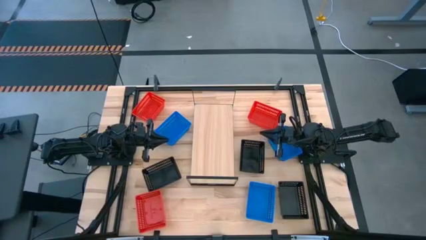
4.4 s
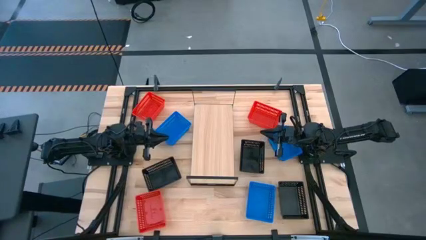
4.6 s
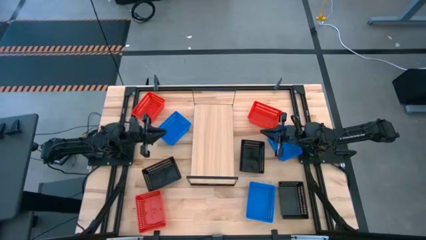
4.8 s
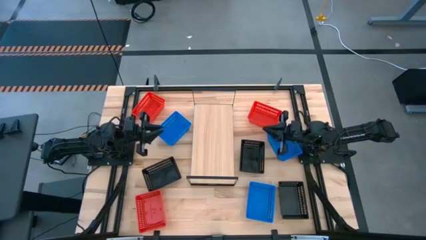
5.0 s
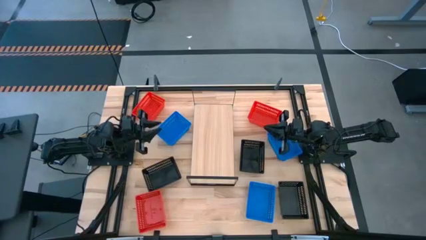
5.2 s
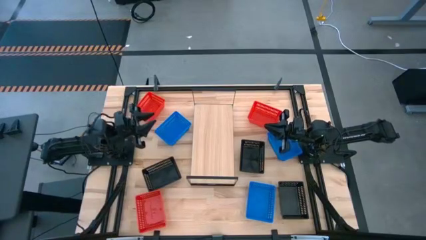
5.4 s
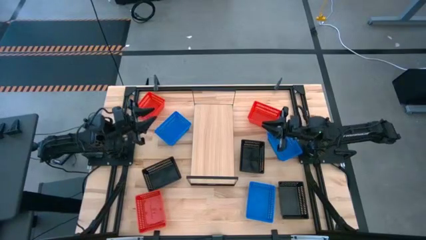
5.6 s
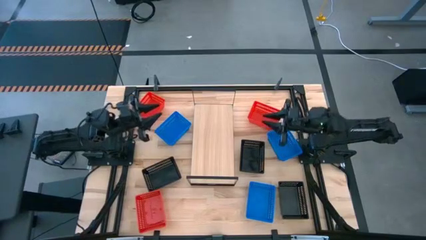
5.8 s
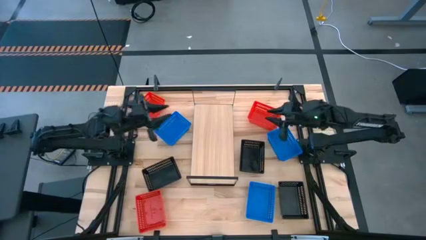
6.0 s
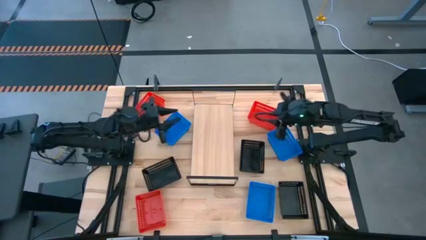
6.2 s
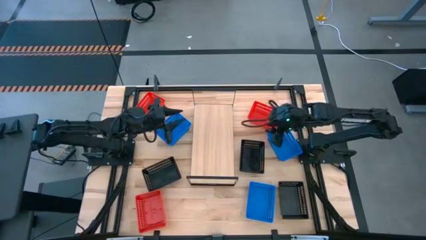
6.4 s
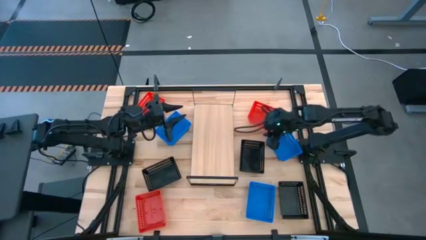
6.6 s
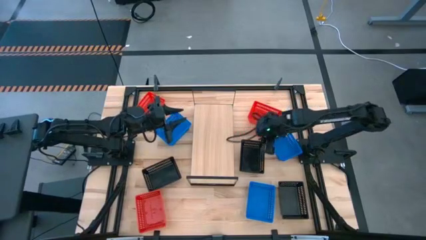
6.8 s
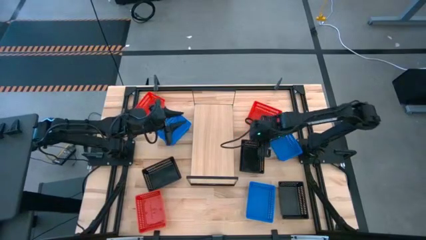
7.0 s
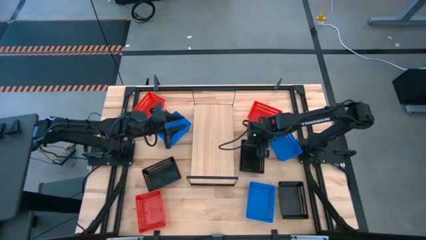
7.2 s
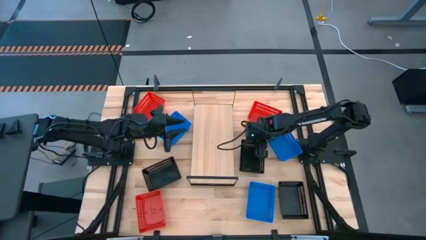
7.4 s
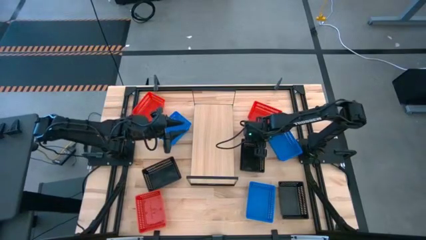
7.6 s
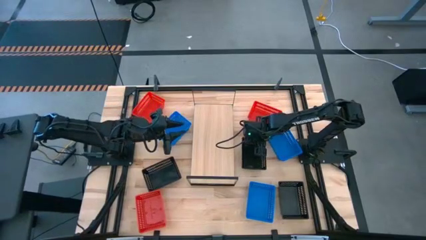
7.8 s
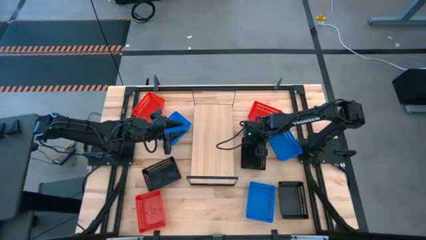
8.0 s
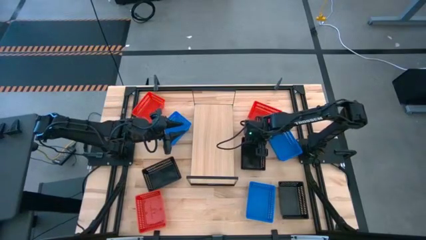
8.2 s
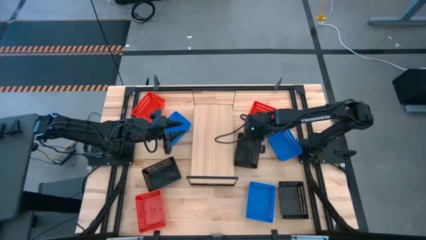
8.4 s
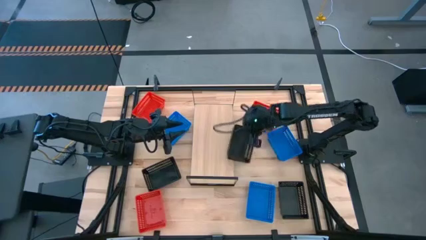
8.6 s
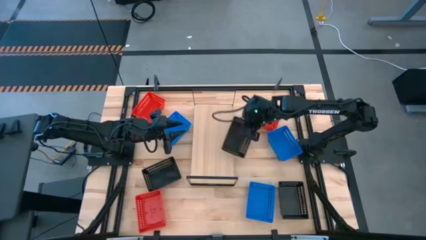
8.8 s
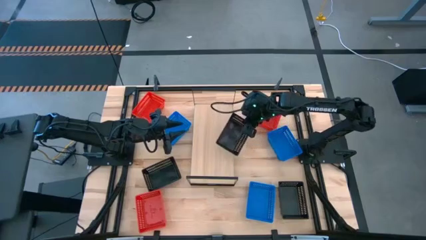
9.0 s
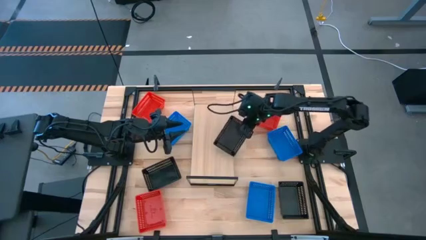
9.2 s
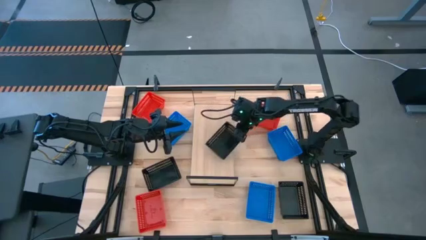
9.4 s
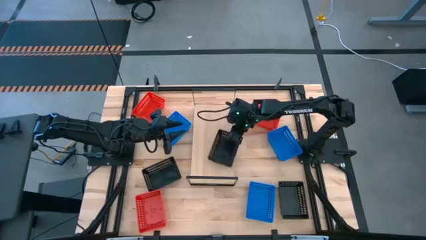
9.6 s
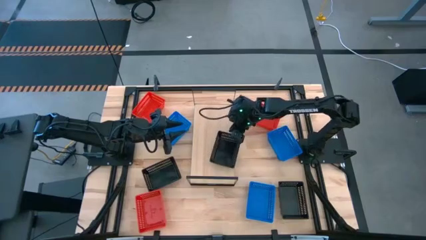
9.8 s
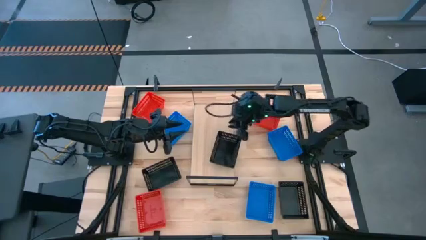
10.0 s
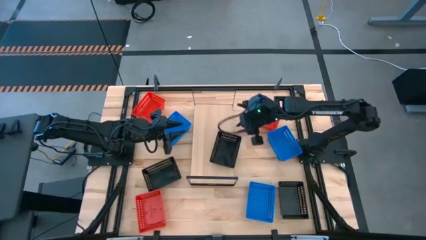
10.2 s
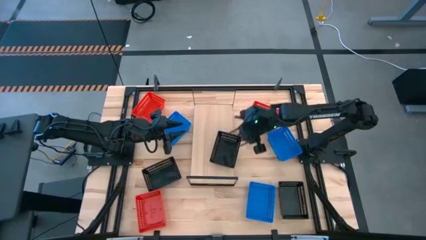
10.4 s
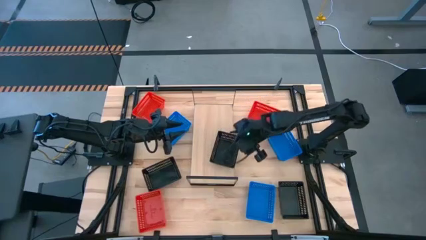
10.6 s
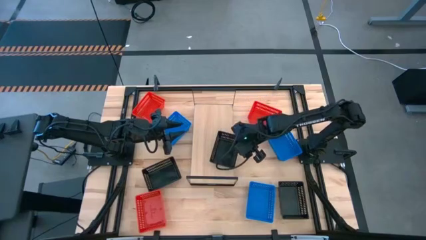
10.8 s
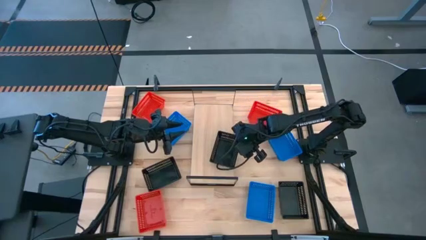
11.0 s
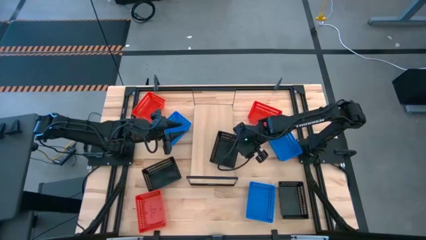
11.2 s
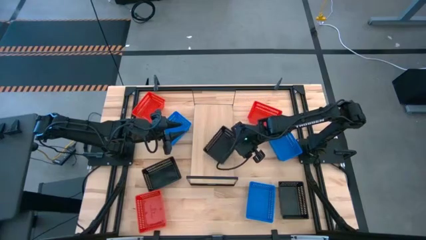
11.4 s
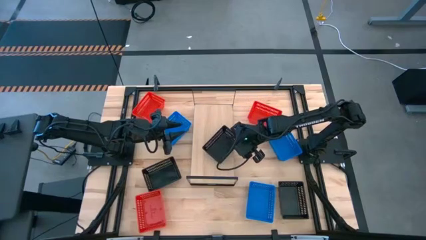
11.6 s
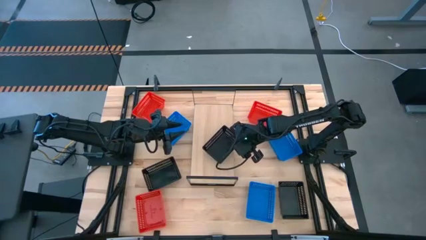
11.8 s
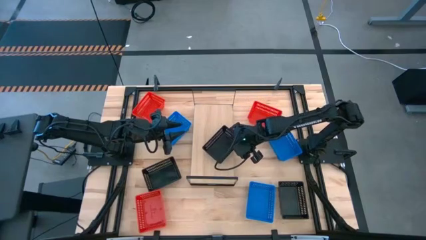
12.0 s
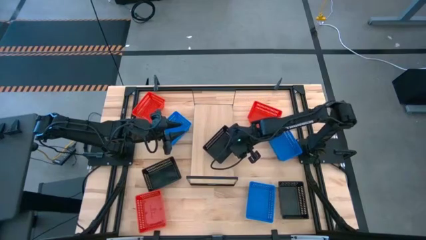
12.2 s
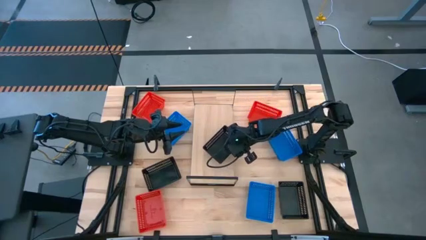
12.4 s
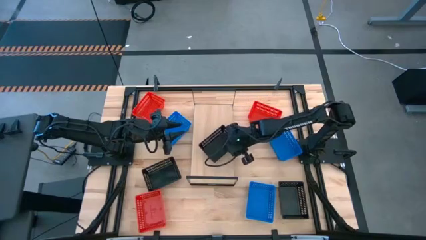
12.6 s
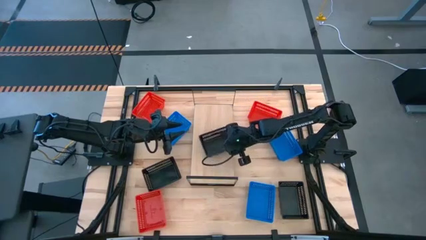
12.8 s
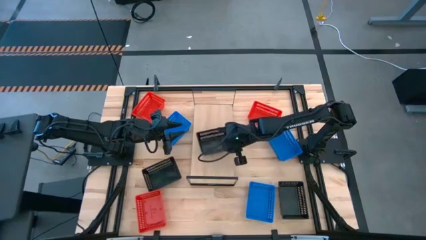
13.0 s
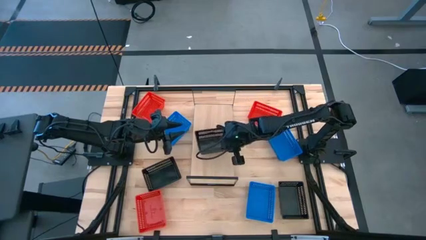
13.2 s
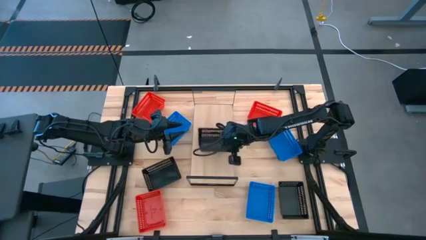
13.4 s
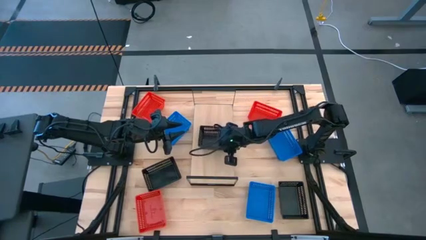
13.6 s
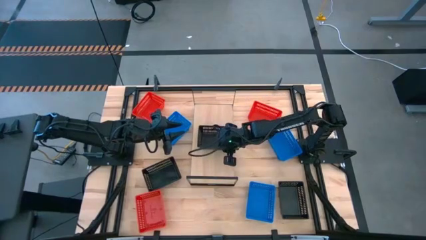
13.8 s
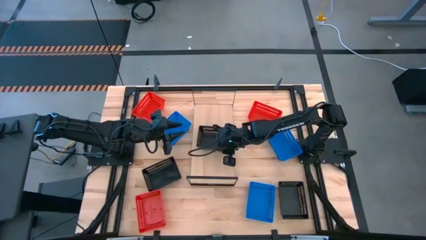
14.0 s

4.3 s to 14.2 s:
Task: Stack baskets on shelf by color
Put the middle black bin on the shelf

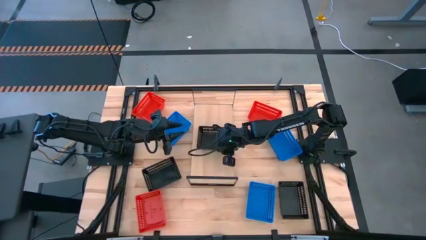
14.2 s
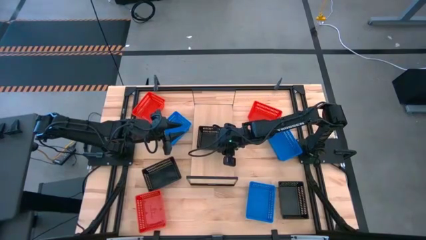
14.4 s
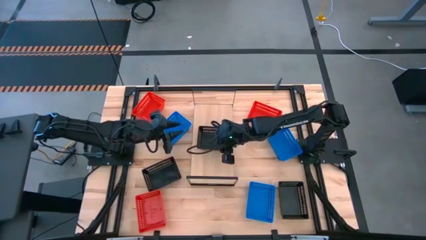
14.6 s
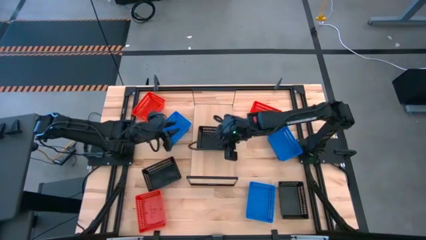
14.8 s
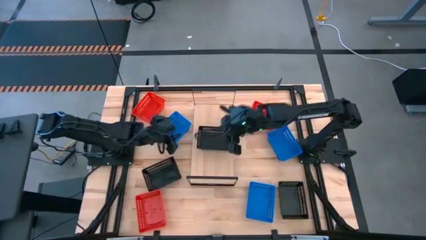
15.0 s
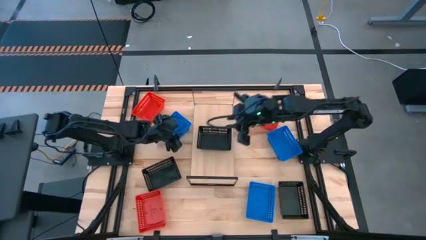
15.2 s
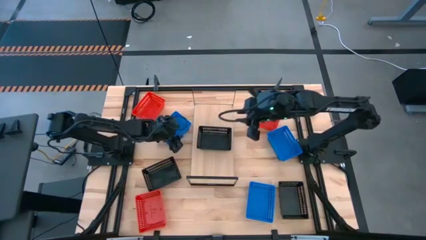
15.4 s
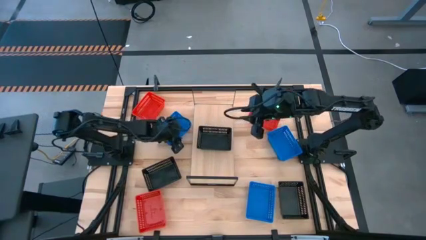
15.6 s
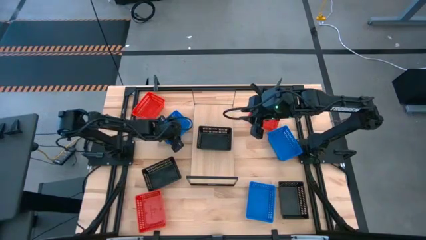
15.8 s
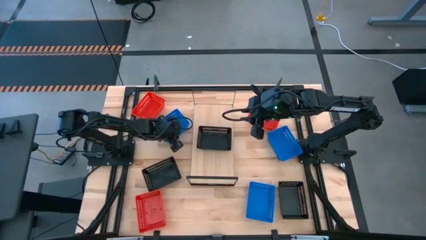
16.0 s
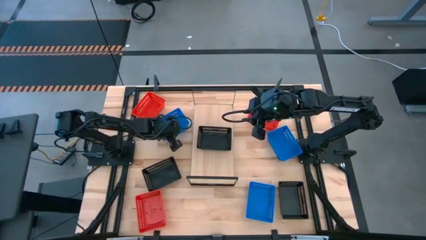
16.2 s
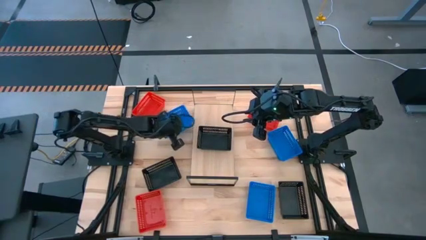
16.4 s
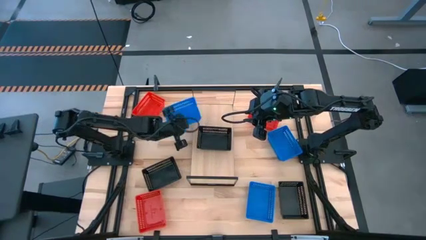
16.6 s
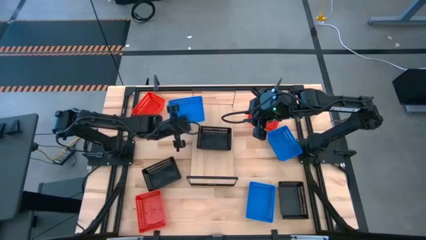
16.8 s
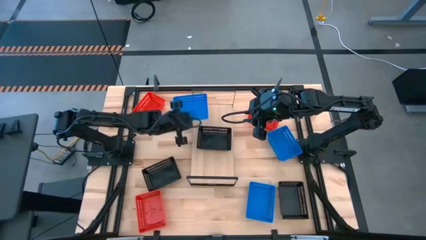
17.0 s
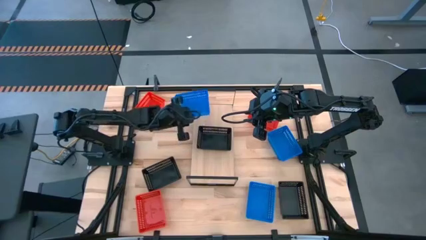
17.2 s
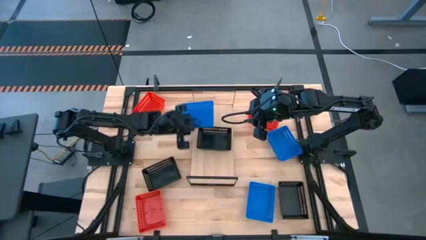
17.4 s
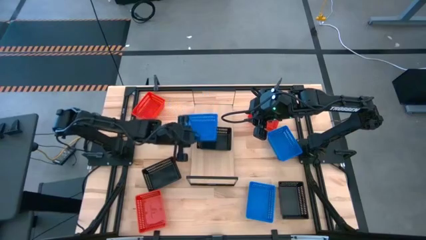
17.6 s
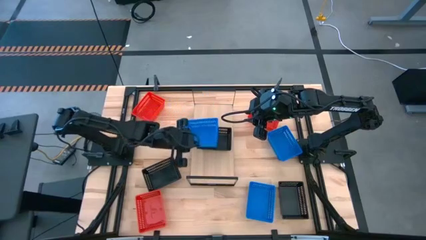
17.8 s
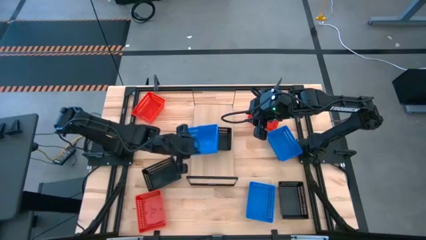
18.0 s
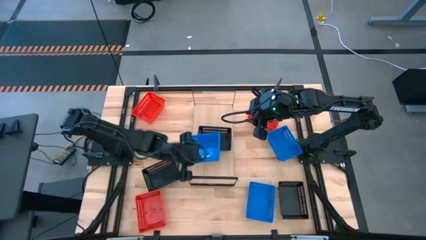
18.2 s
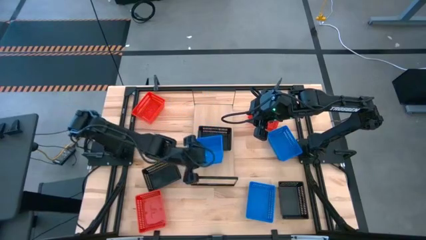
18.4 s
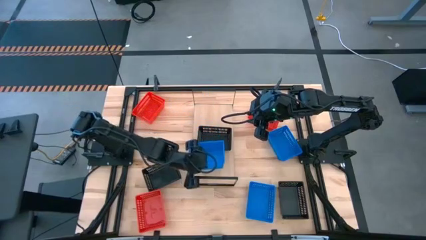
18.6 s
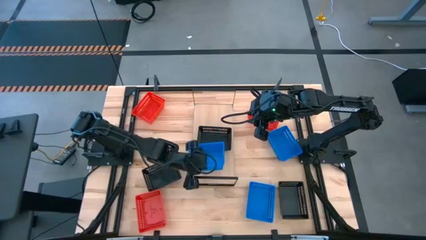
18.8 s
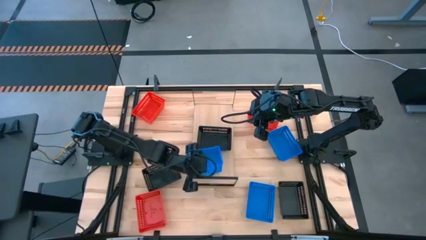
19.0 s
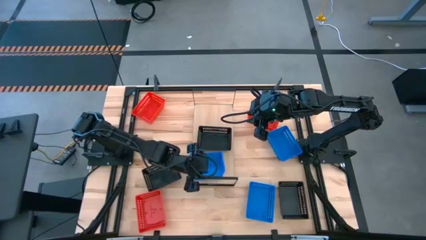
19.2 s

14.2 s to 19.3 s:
Put the left blue bin on the shelf
